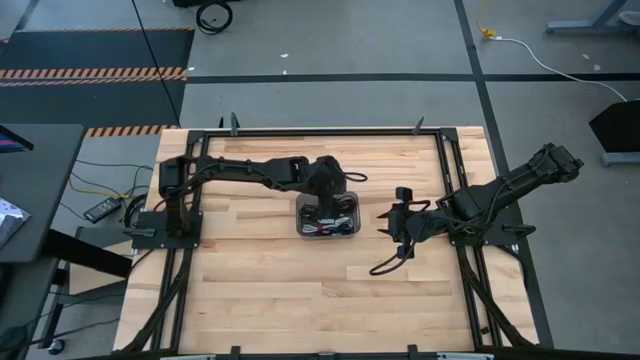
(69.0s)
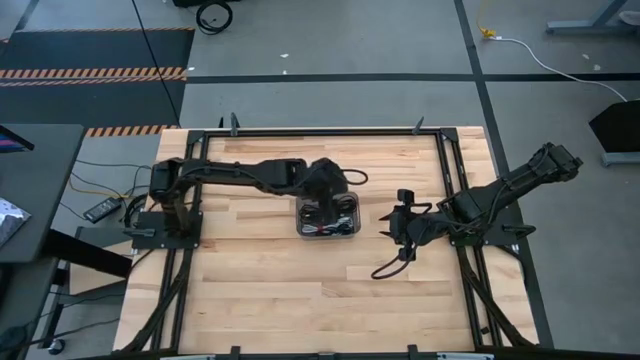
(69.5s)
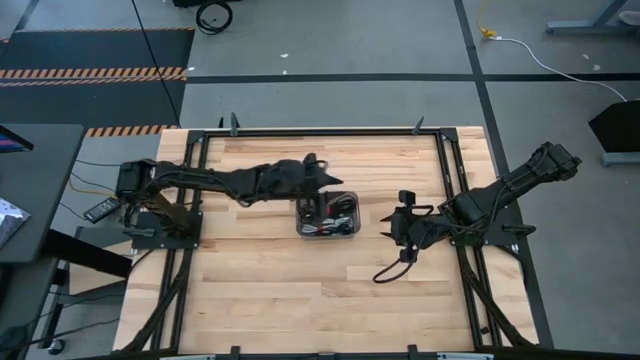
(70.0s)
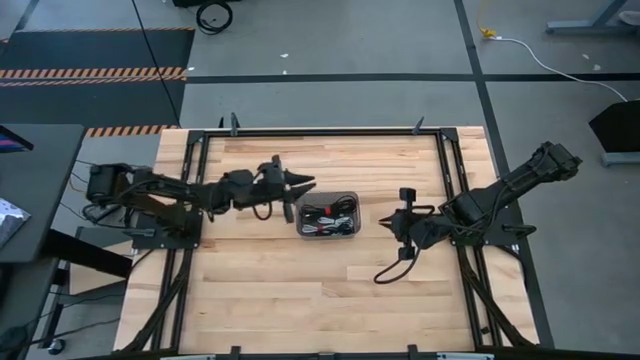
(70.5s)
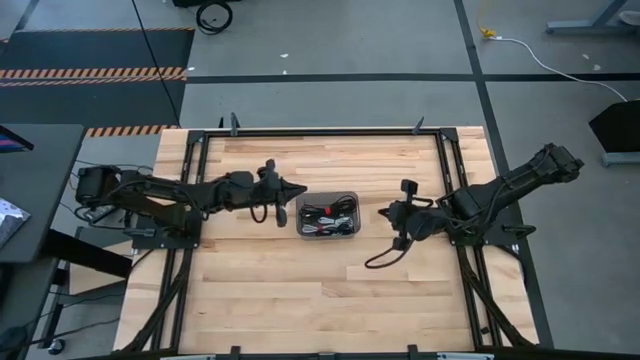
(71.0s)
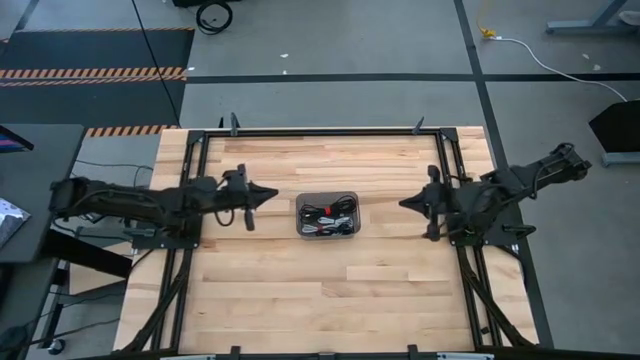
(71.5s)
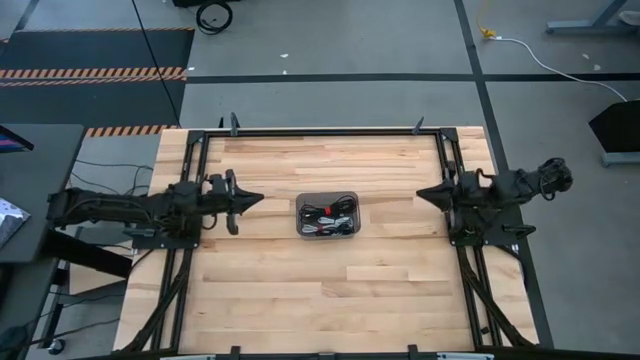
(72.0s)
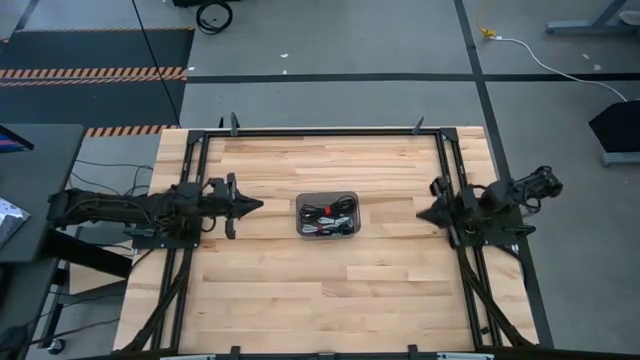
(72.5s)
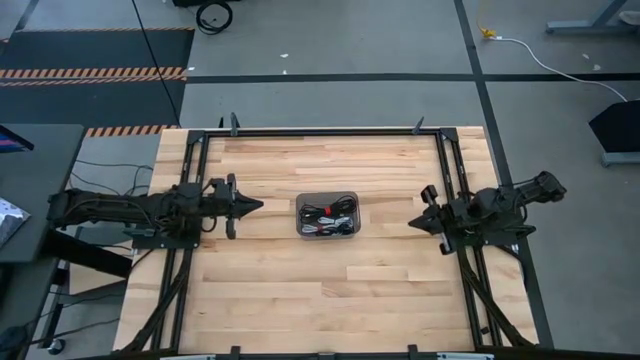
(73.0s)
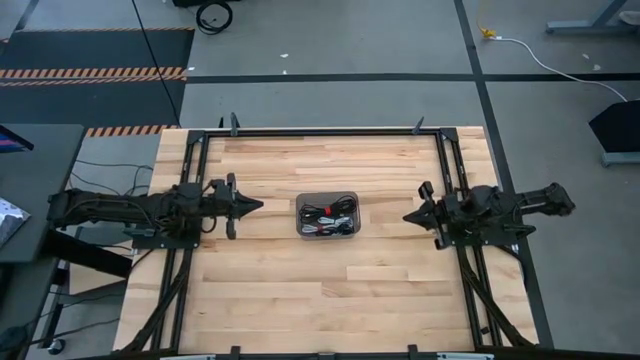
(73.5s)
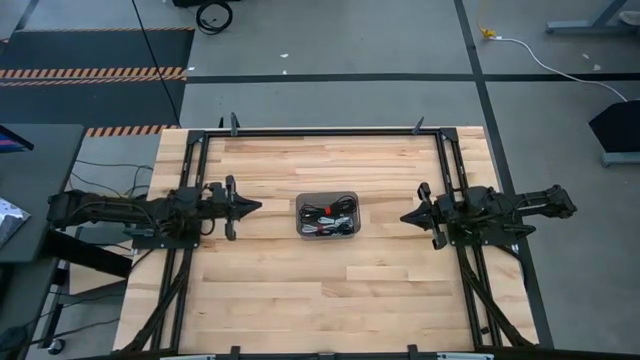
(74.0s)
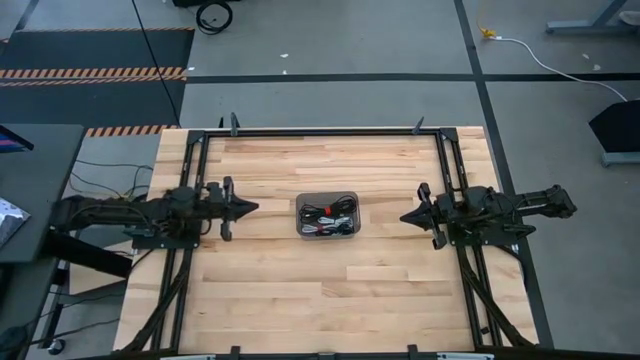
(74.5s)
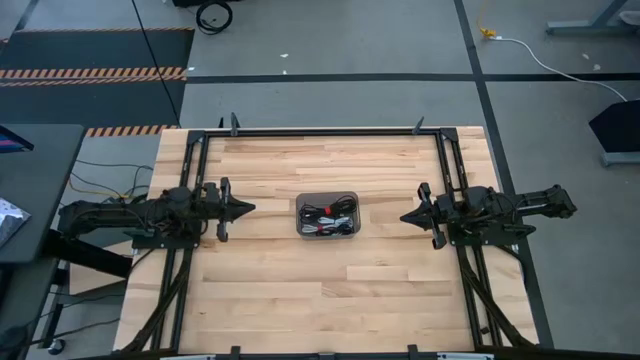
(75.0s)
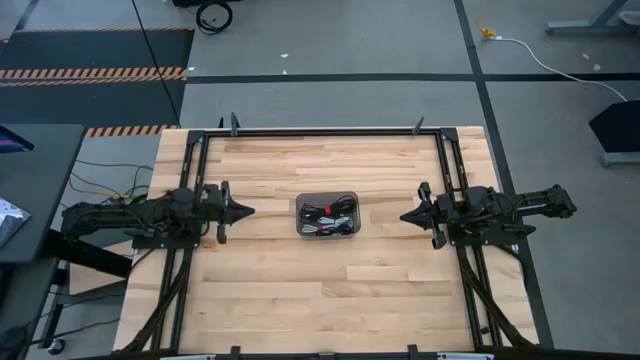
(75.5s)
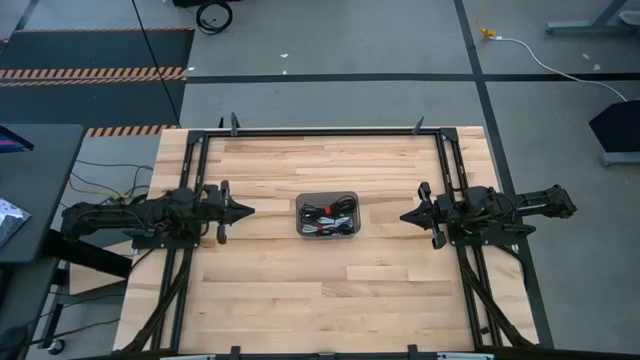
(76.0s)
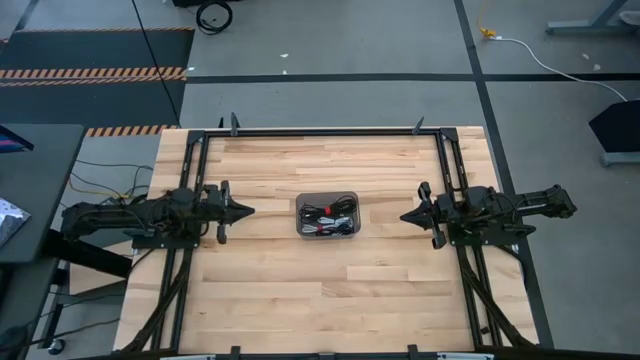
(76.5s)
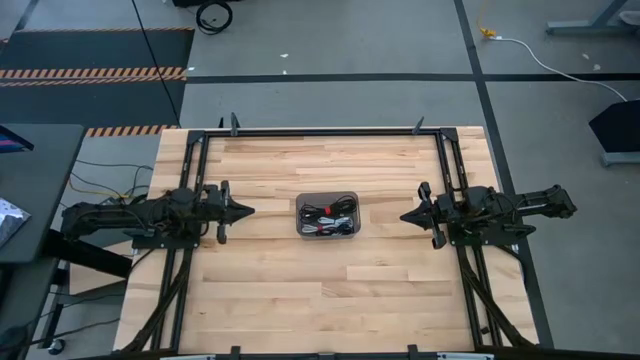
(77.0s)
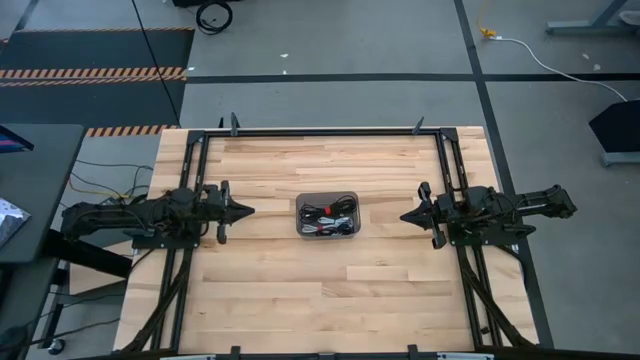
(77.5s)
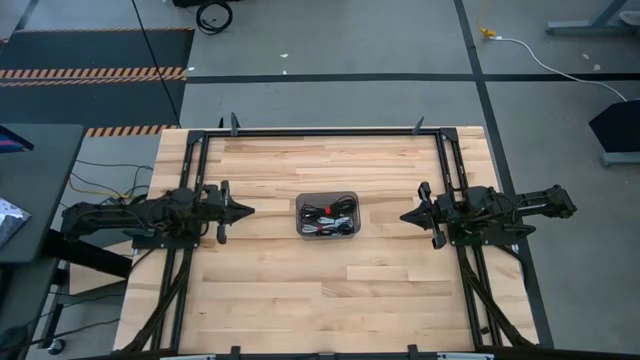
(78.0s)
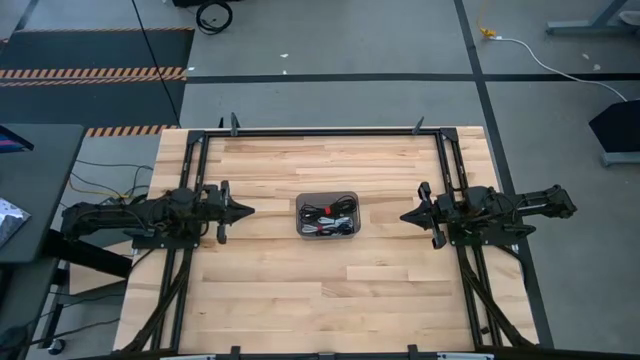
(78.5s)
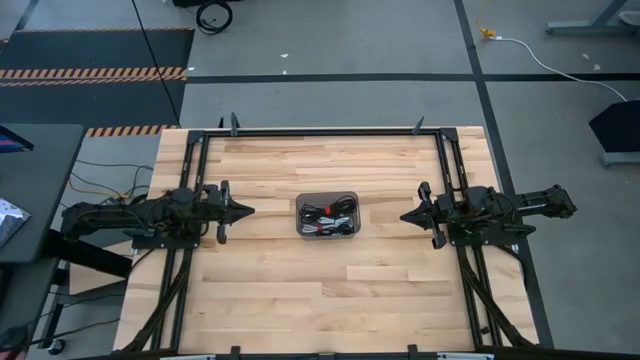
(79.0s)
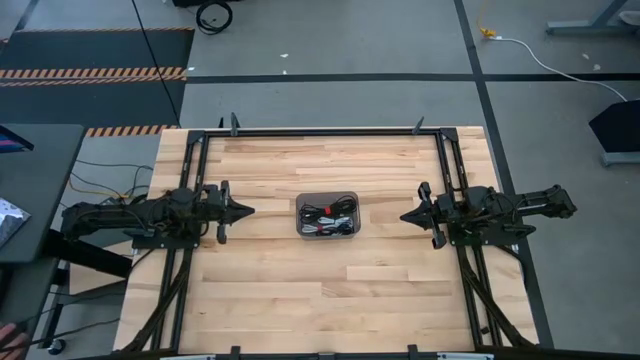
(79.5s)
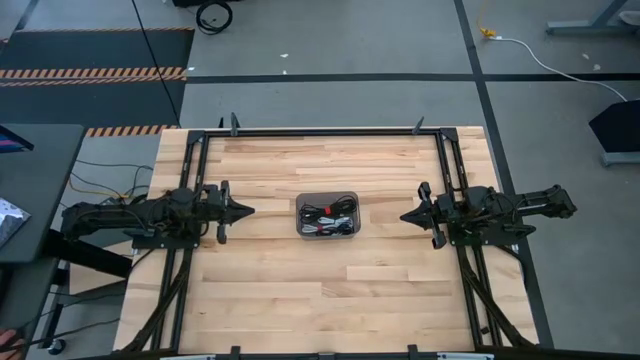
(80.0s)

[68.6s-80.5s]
Task: Pick and place USB-C Cables
Return to Home Position

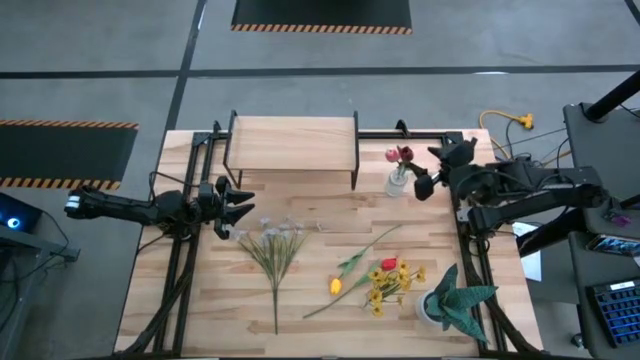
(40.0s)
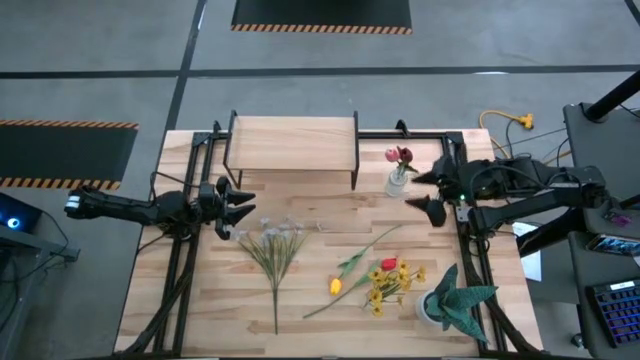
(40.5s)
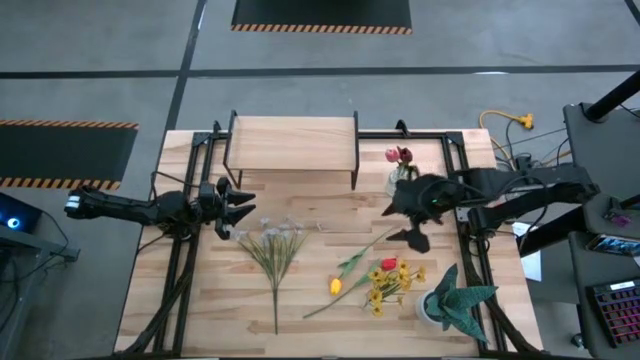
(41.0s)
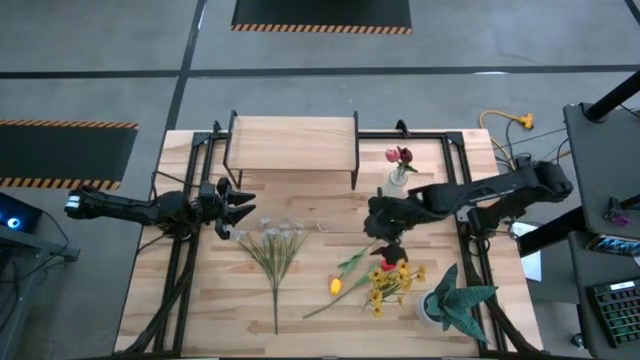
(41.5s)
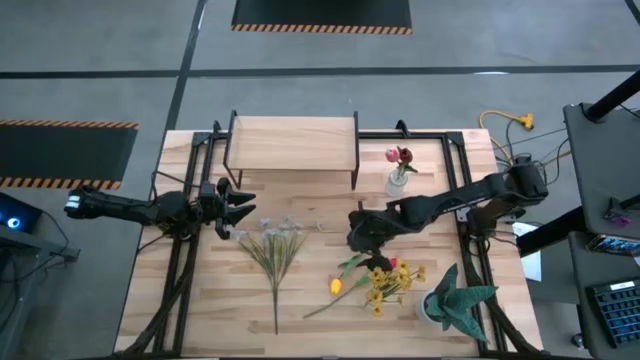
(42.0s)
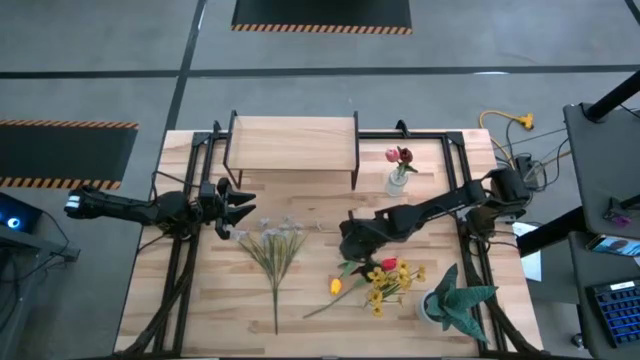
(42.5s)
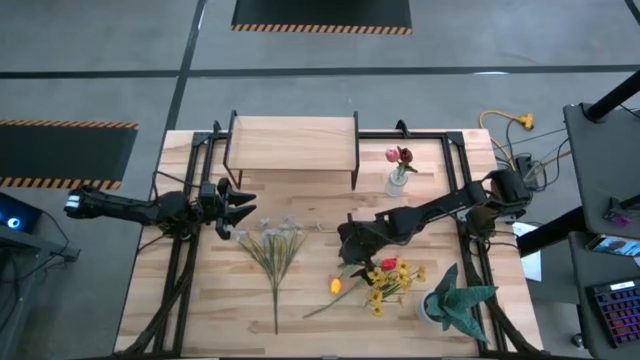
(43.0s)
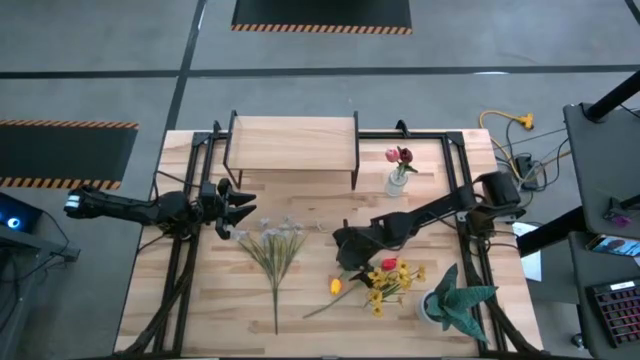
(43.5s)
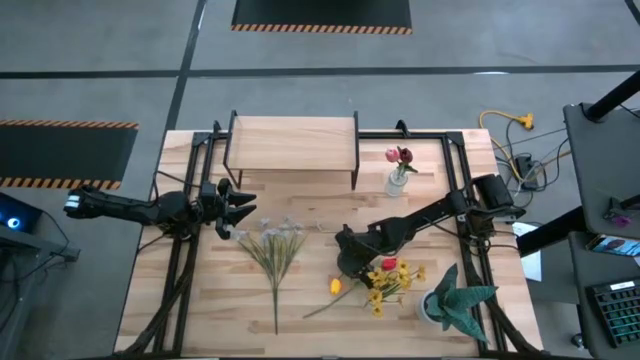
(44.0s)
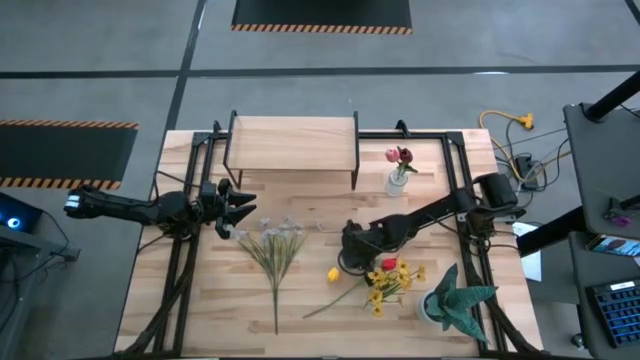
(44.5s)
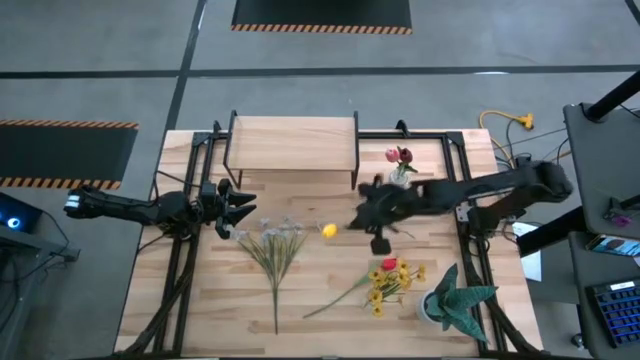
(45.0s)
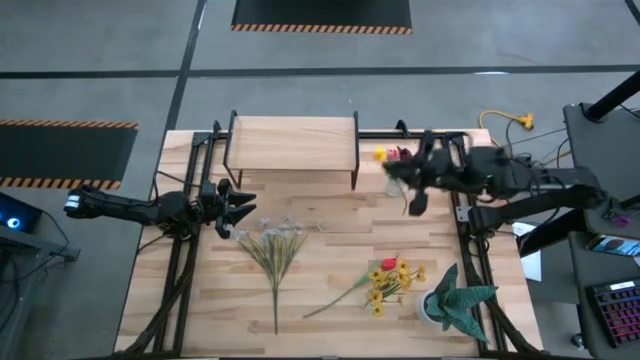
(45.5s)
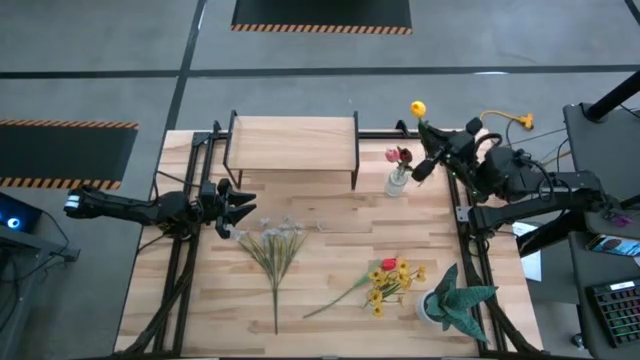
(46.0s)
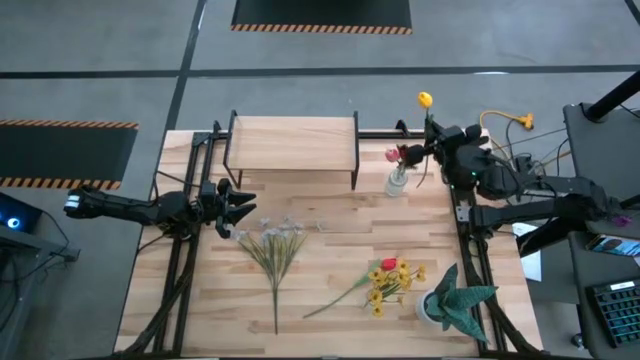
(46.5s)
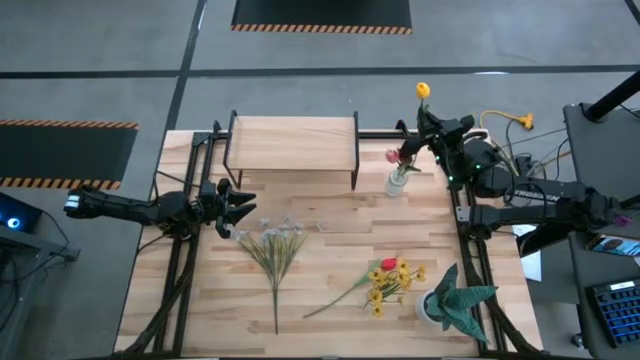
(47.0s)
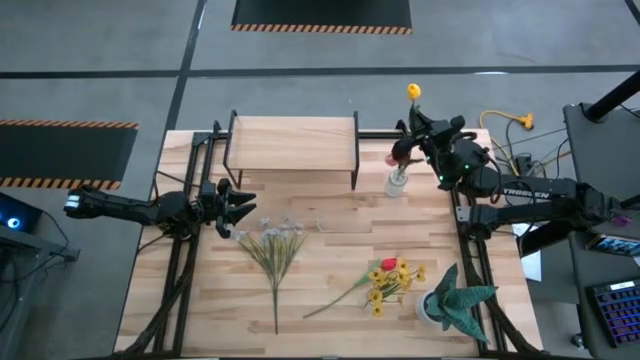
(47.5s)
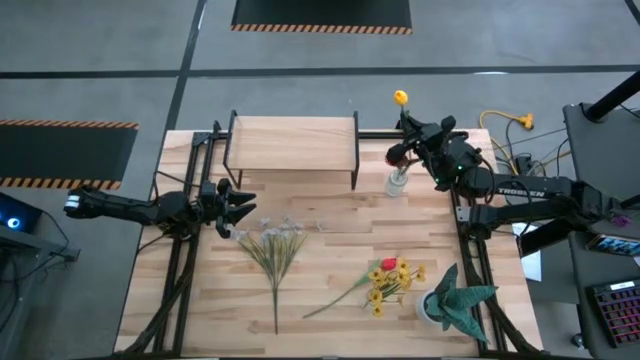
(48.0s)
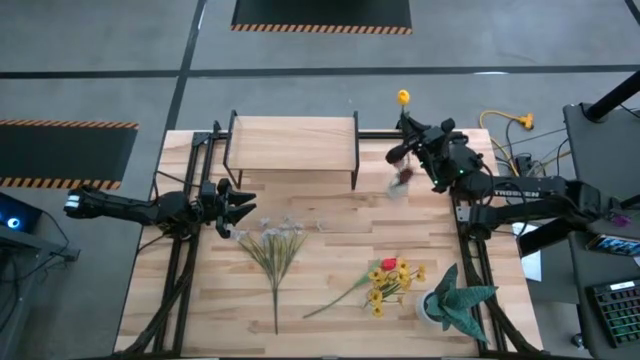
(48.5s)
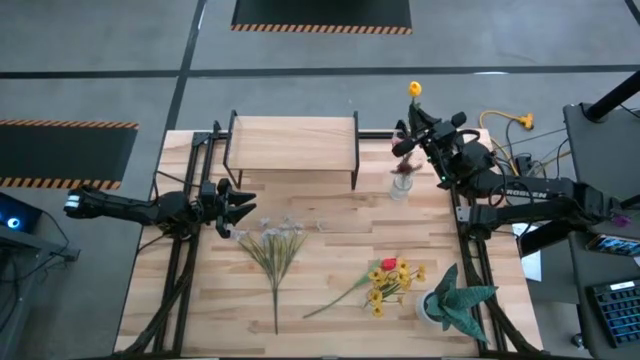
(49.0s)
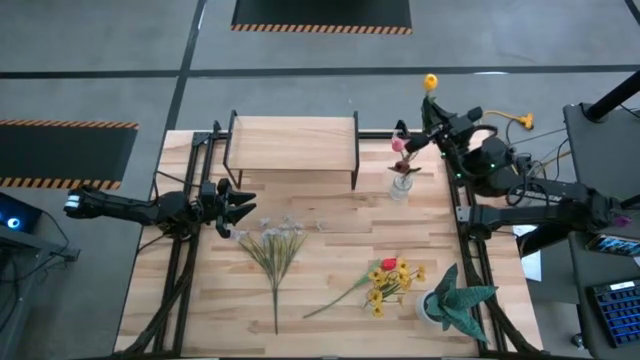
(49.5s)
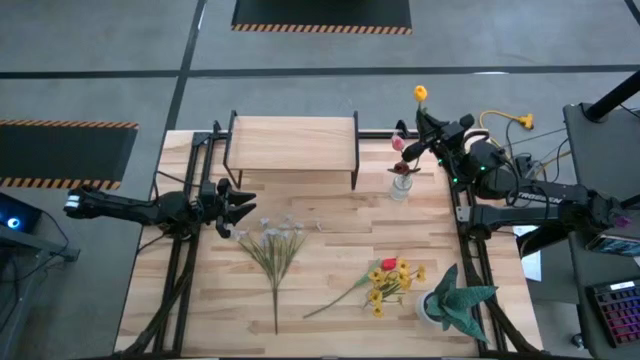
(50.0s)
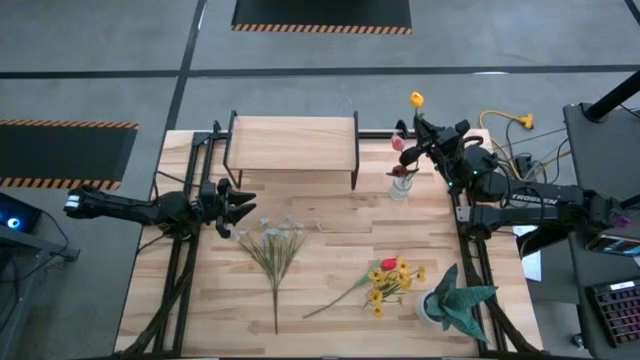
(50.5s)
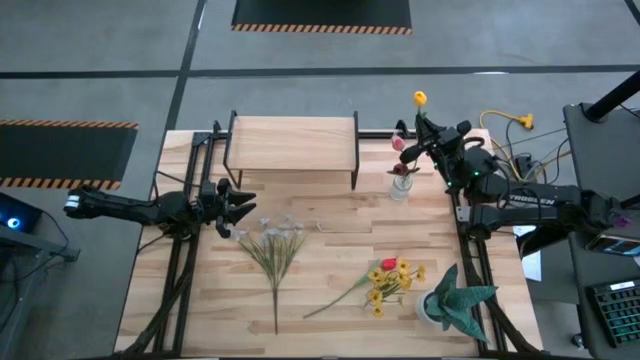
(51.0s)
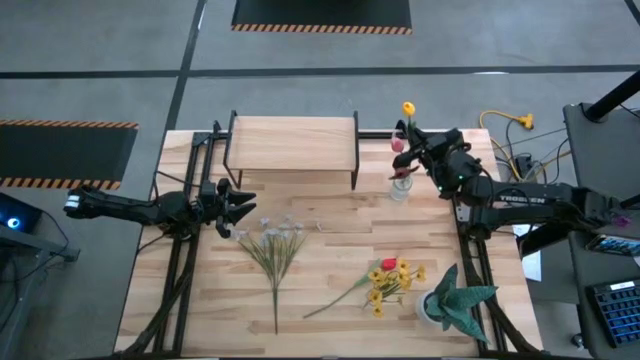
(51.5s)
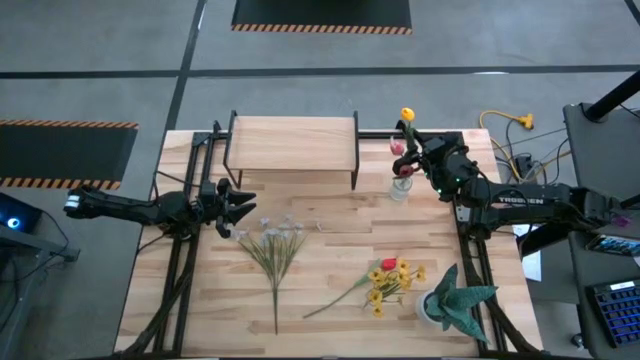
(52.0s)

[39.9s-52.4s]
Task: Pick and place flowers into a vace then onto a shelf
Put the yellow tulip into the top transparent vase
